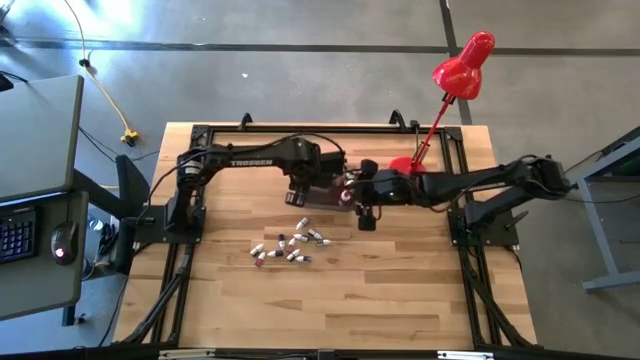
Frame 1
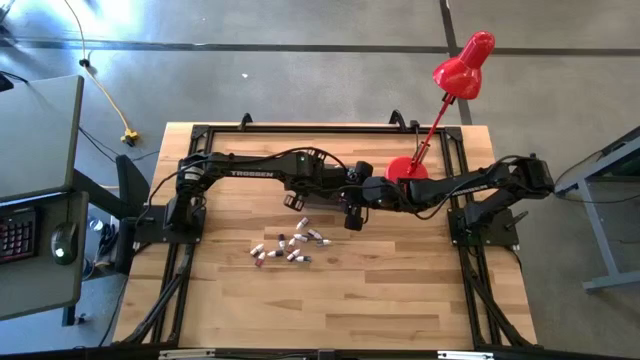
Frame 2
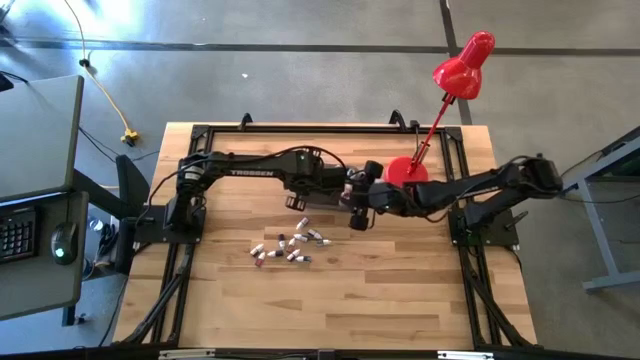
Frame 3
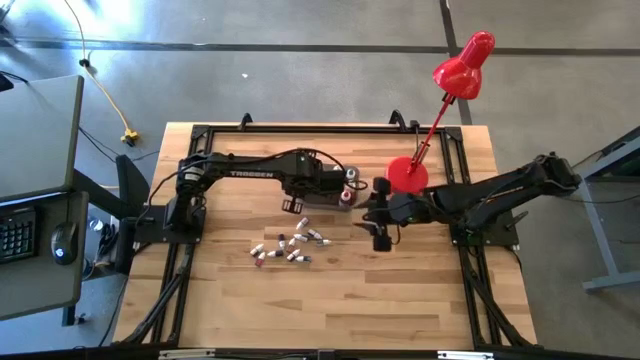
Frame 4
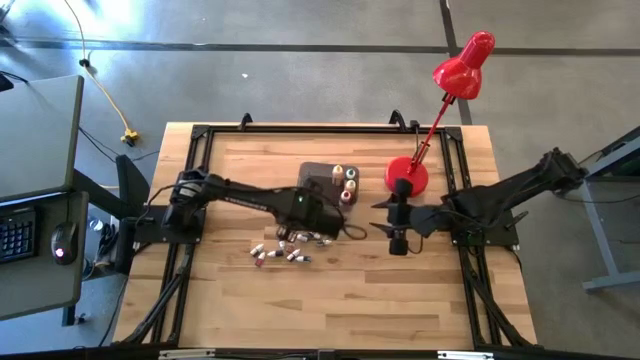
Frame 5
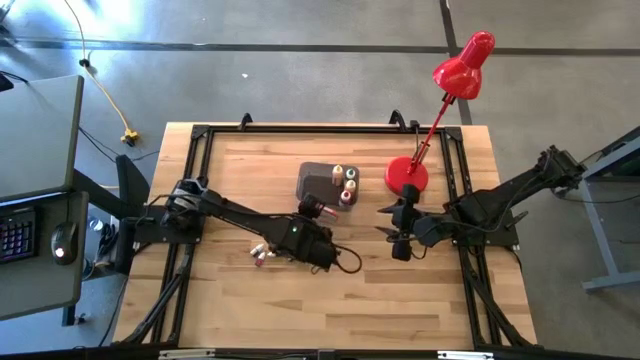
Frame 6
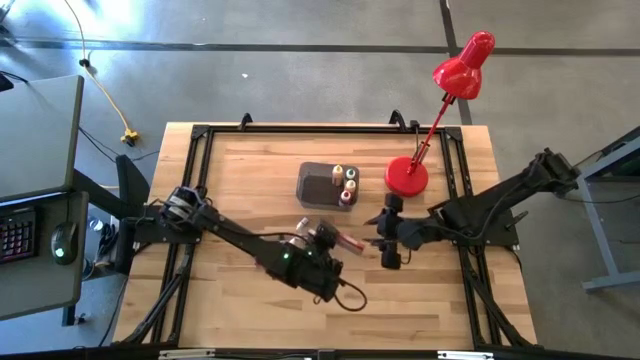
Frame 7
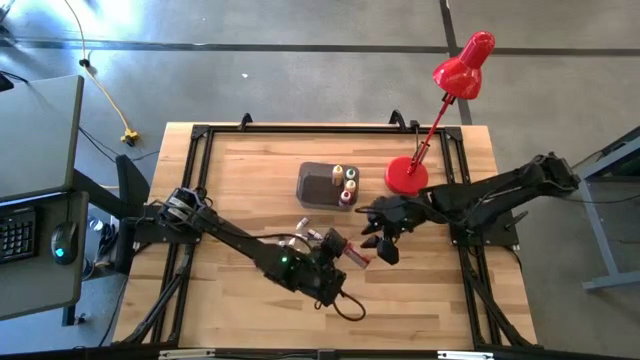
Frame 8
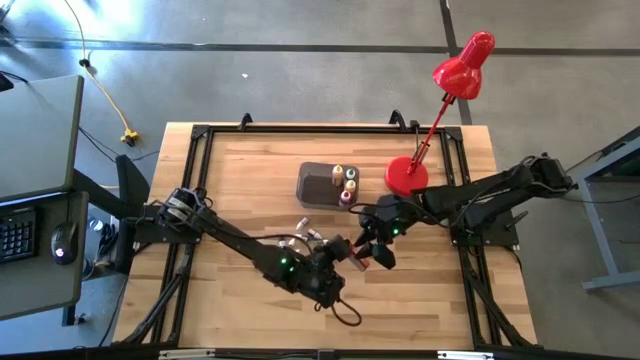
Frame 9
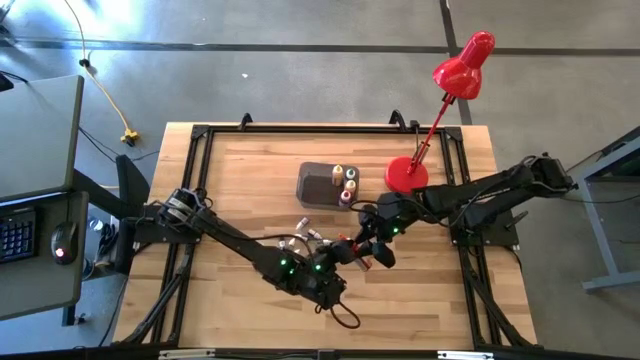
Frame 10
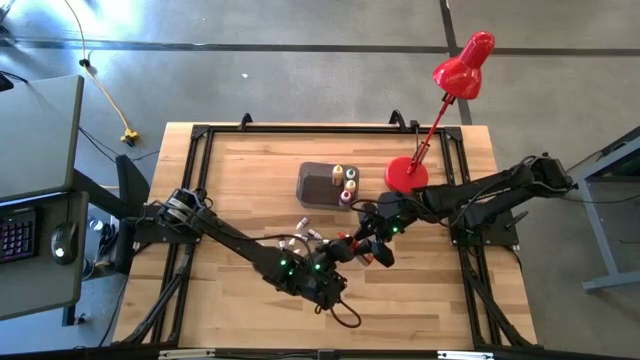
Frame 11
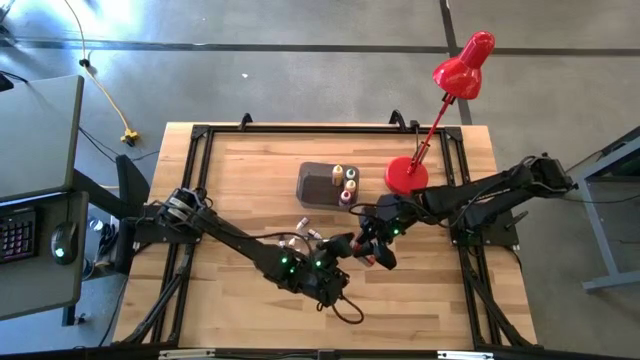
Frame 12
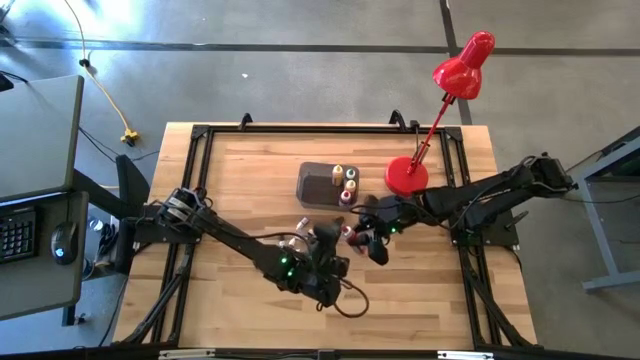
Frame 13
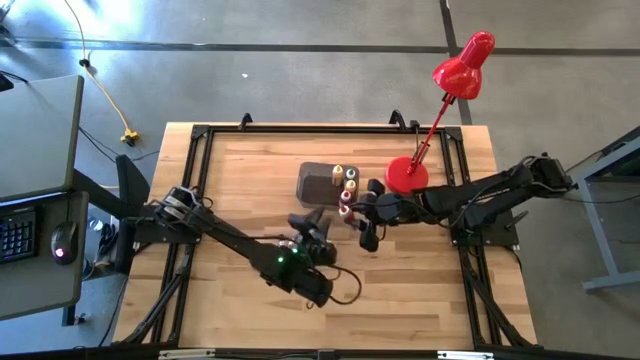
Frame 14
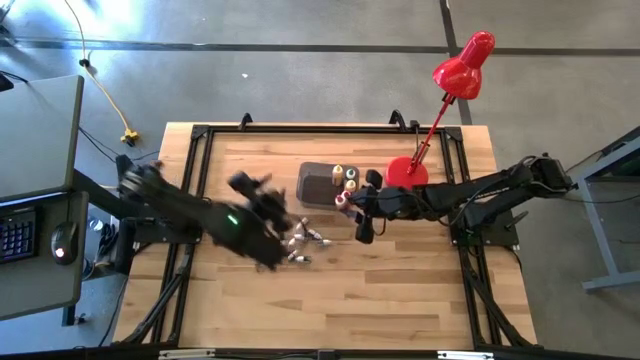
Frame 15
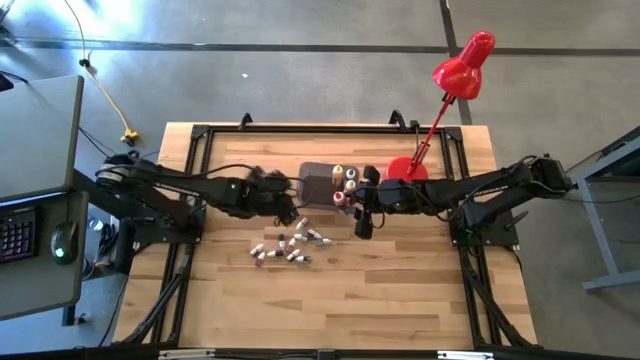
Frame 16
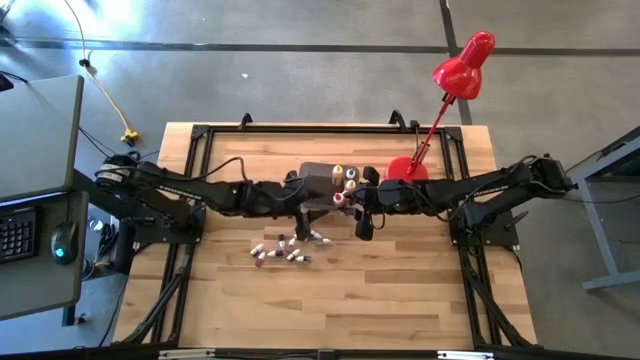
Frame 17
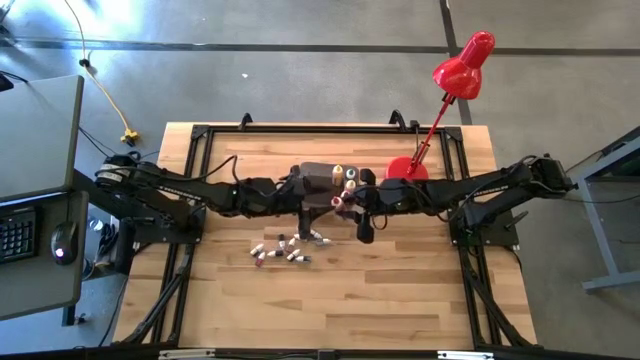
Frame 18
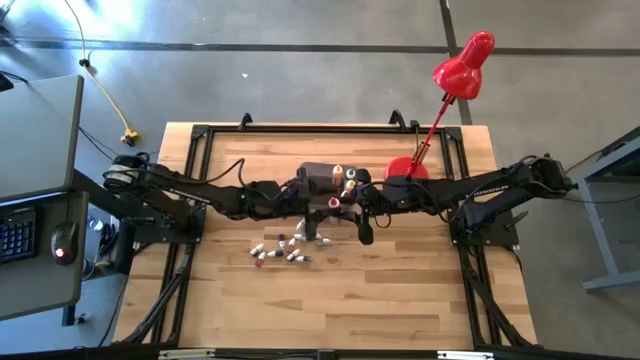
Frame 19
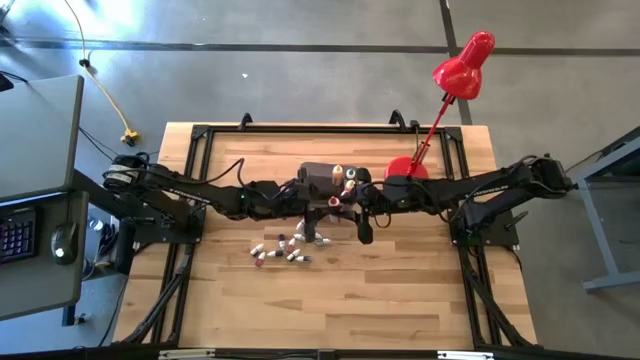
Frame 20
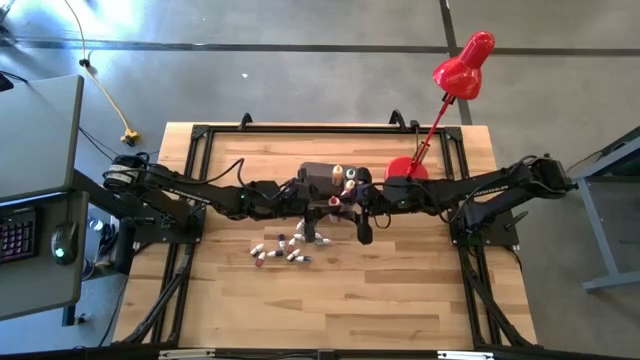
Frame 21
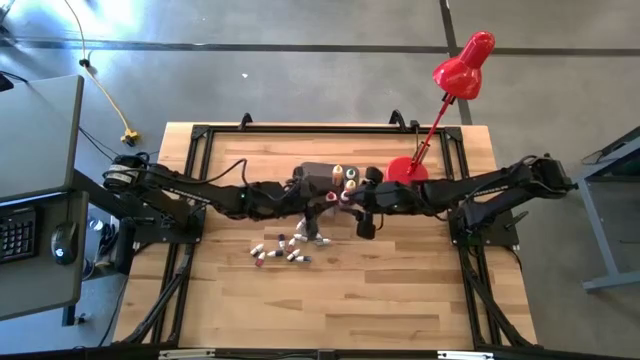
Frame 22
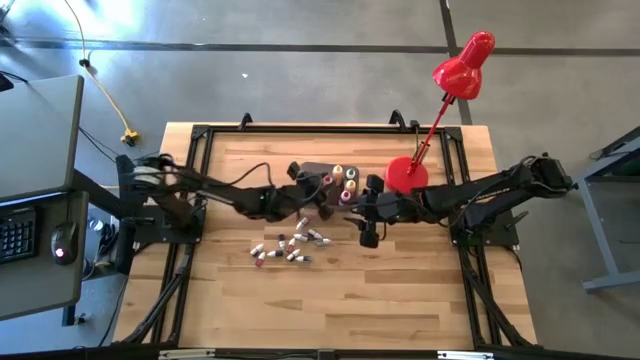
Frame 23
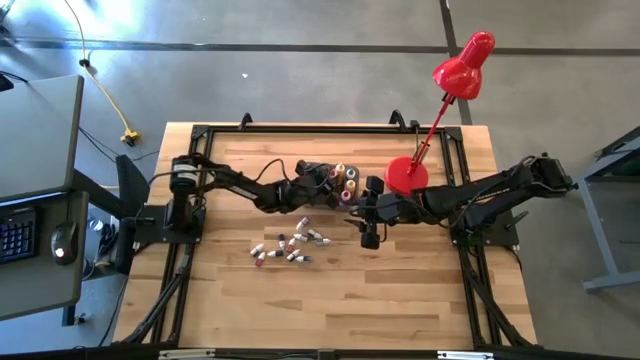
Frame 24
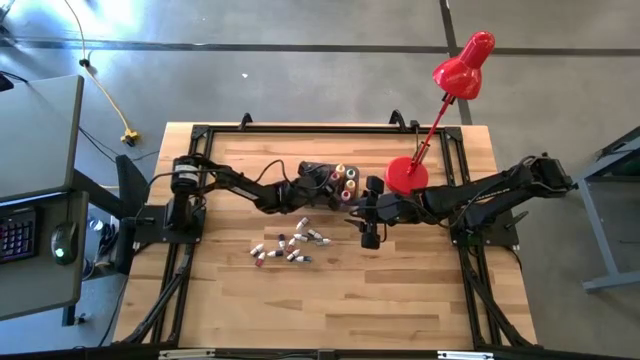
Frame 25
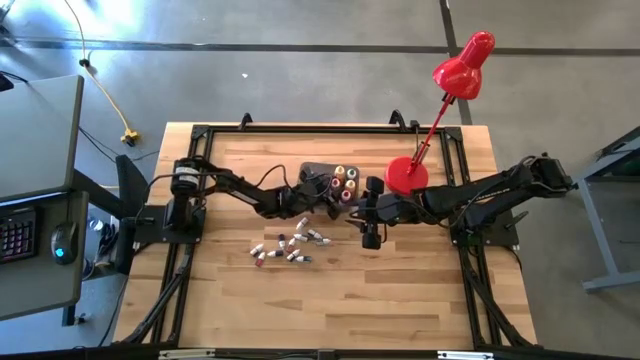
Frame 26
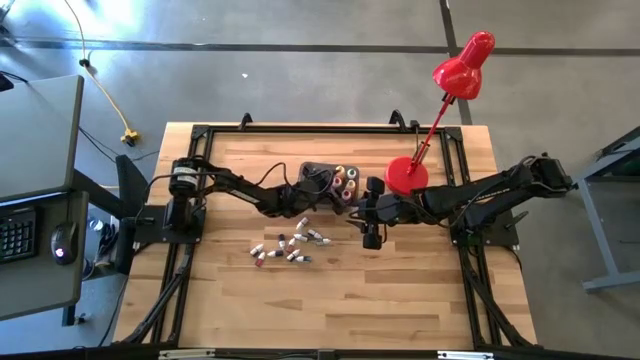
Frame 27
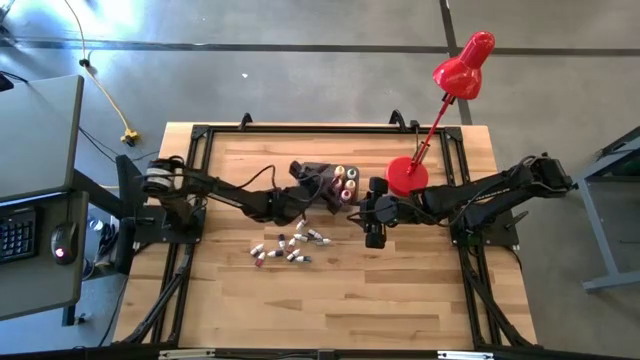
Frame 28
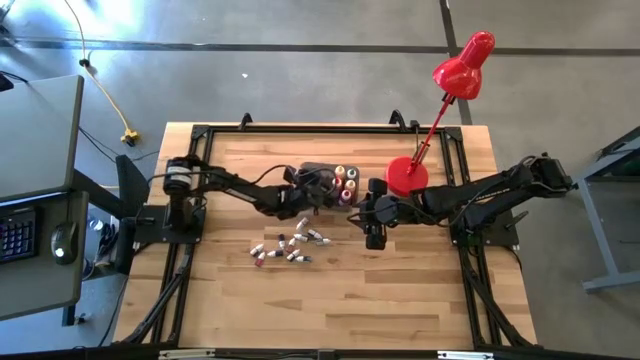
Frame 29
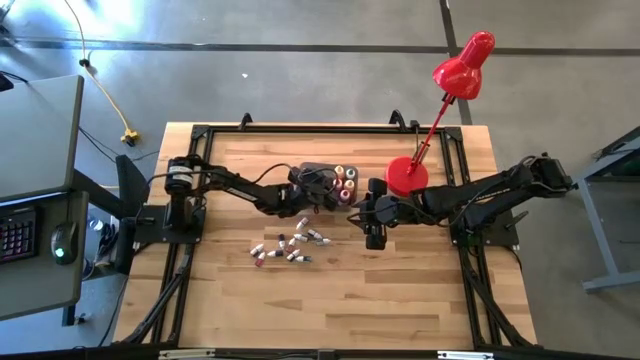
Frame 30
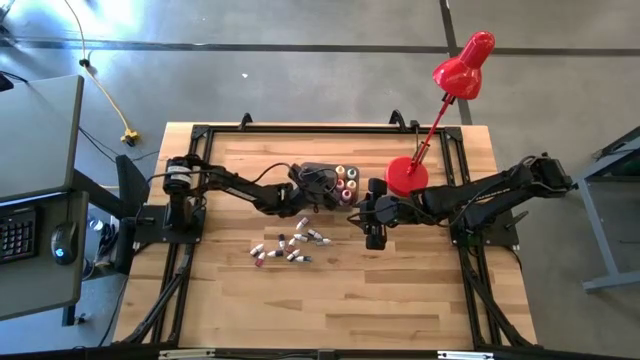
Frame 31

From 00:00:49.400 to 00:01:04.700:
Task: Pick & Place food coloring
Put the big orange food coloring bottle into the black bin

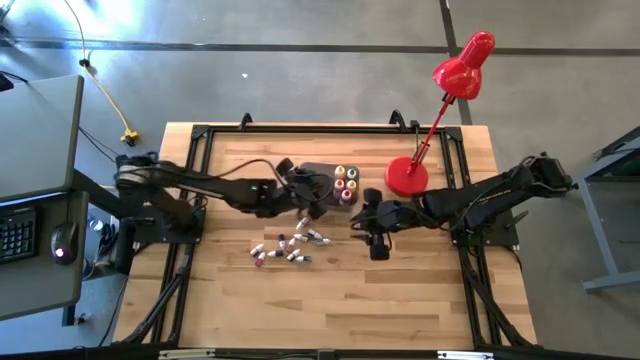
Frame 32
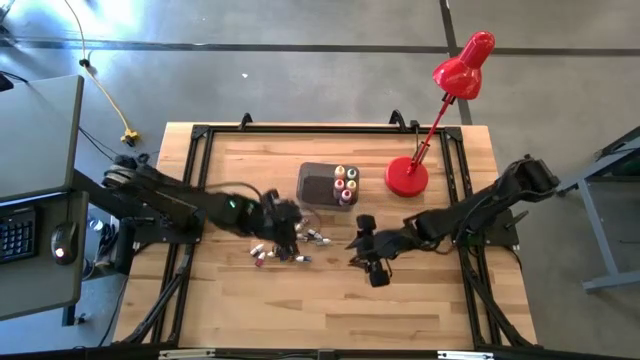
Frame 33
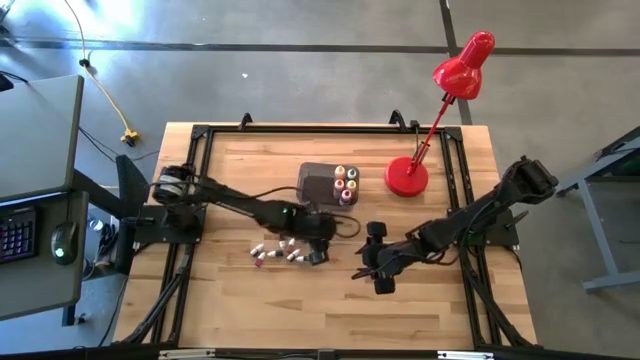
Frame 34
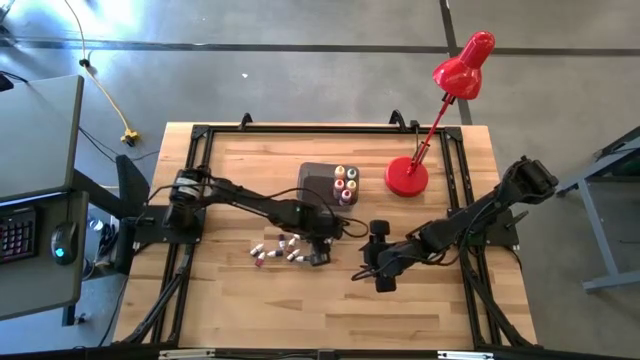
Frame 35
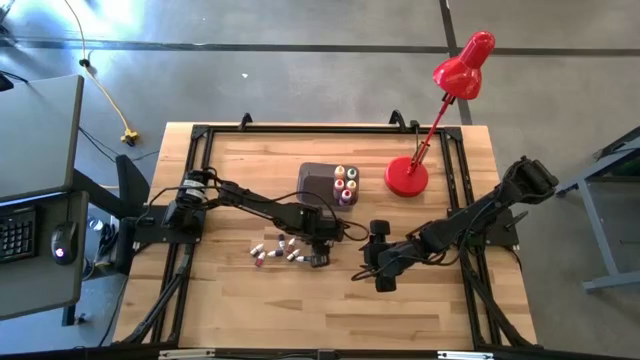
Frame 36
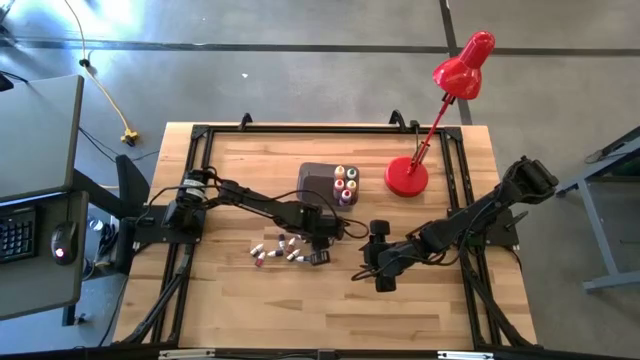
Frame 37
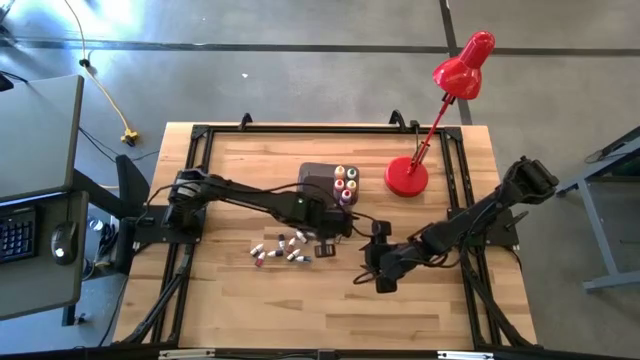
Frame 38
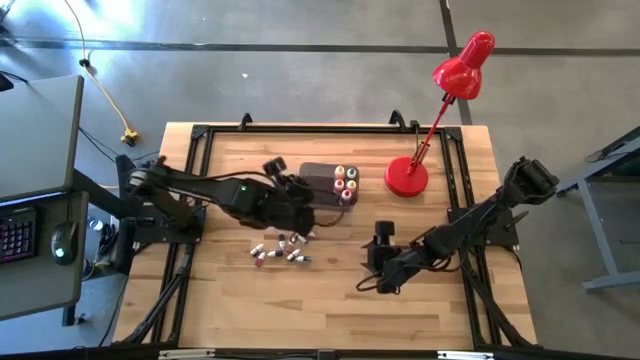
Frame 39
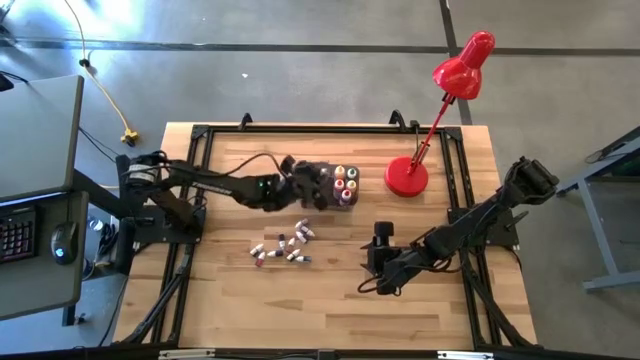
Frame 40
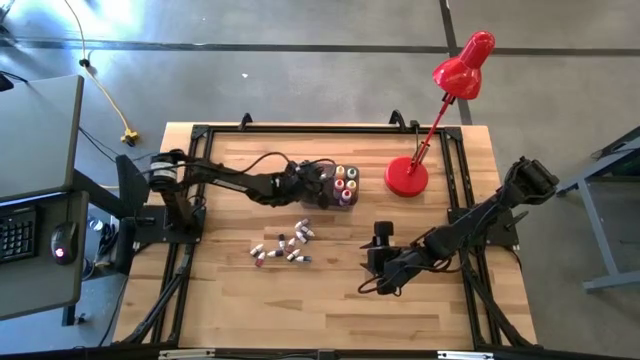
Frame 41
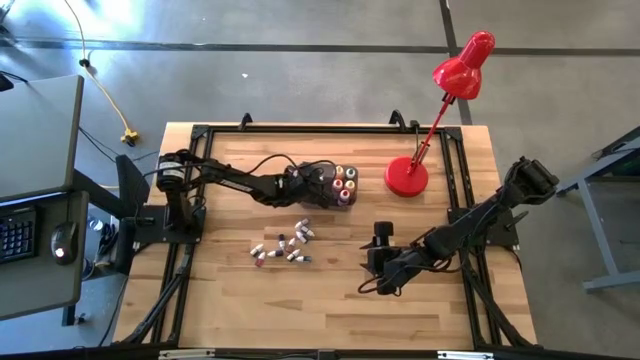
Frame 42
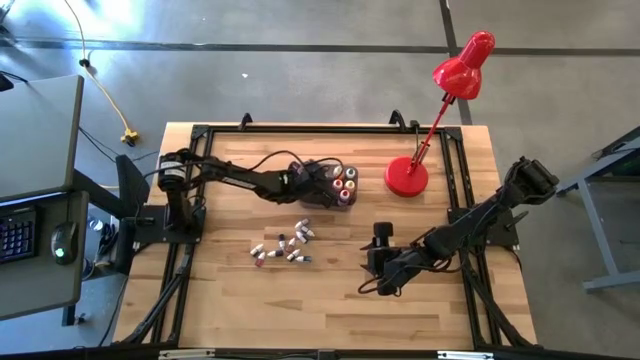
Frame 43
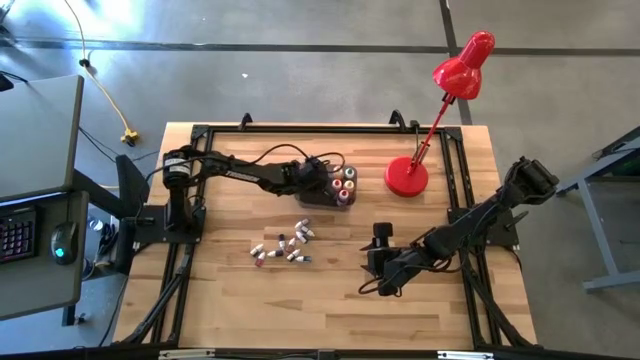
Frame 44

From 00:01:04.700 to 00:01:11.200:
Put the small green food coloring bottle into the black bin
